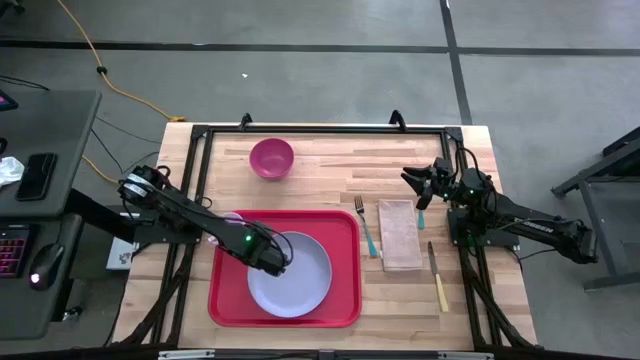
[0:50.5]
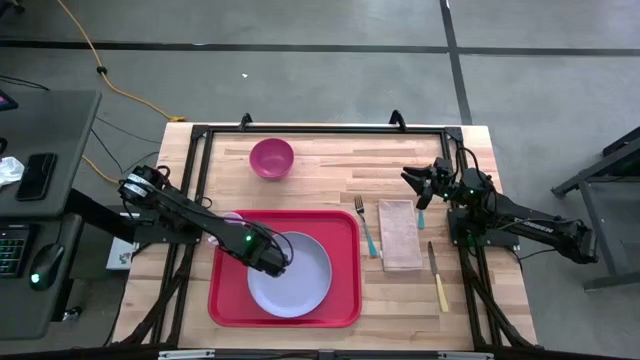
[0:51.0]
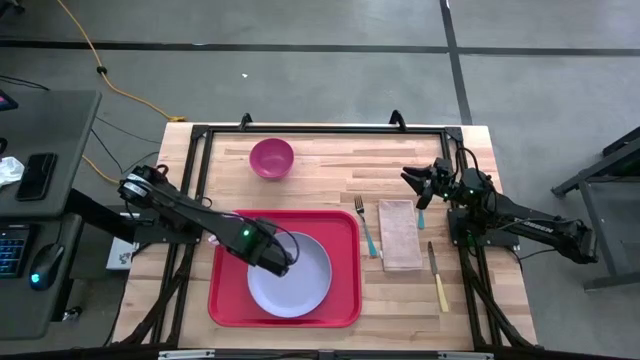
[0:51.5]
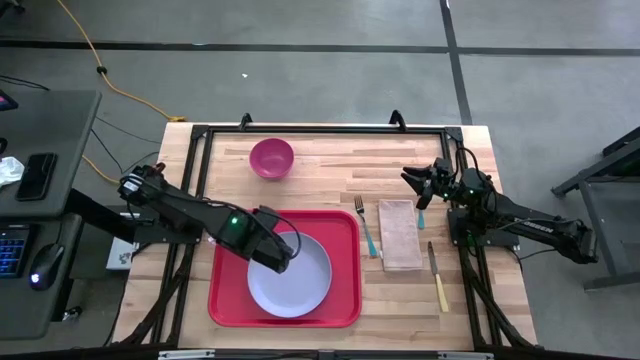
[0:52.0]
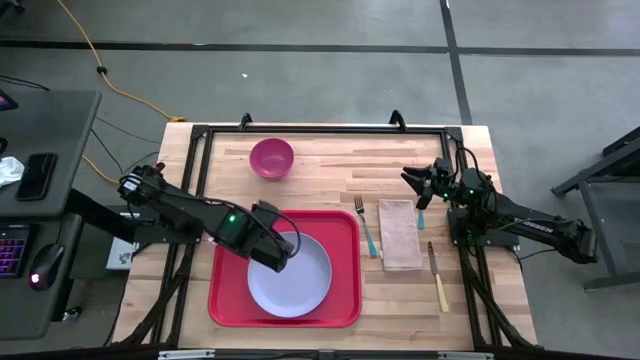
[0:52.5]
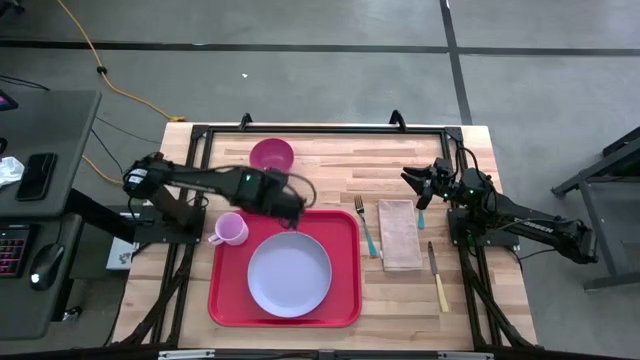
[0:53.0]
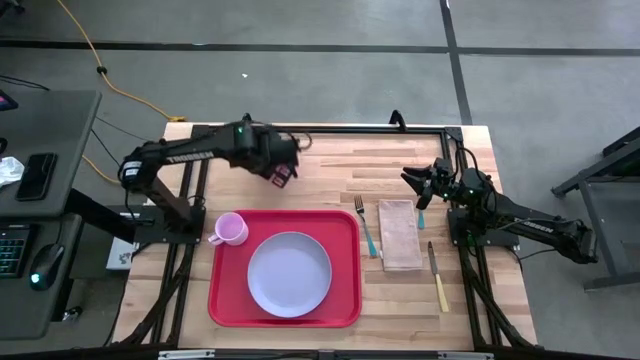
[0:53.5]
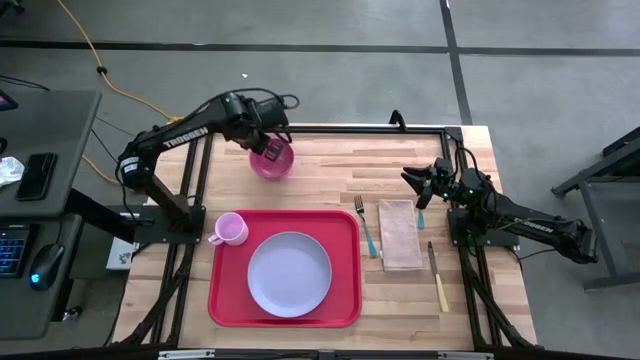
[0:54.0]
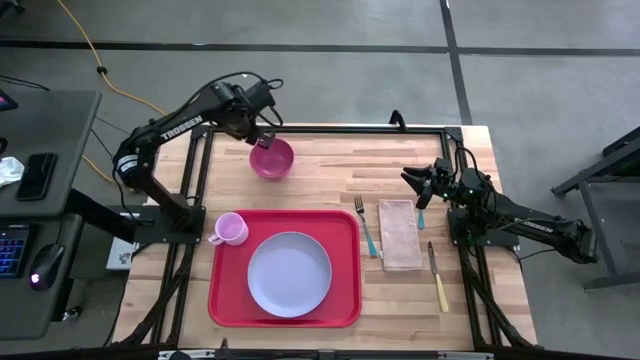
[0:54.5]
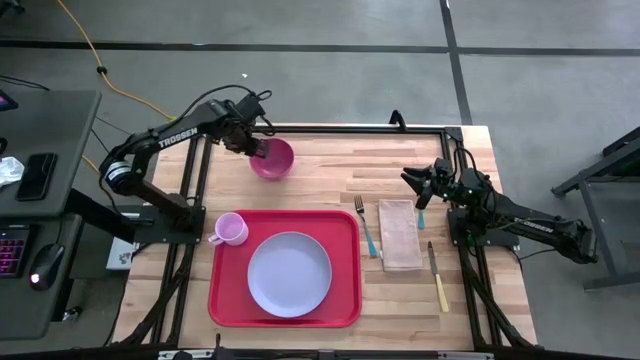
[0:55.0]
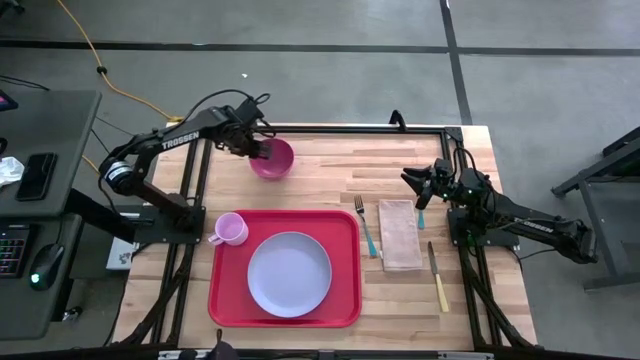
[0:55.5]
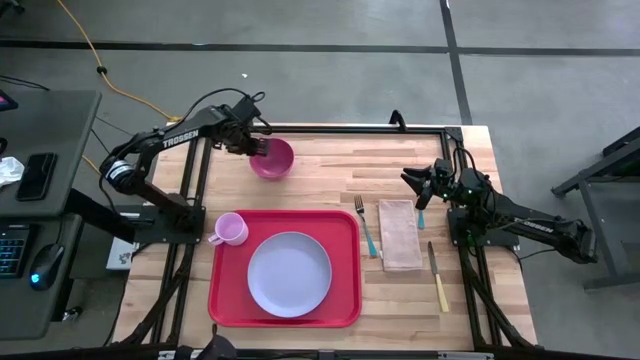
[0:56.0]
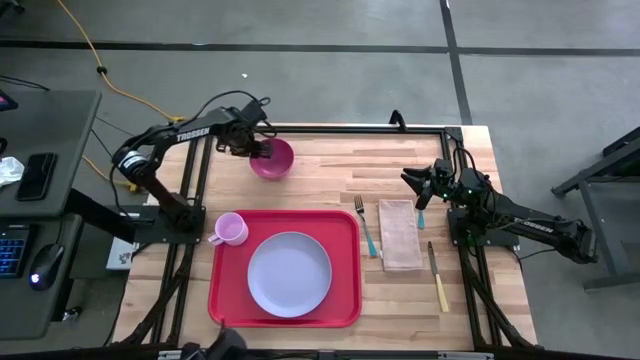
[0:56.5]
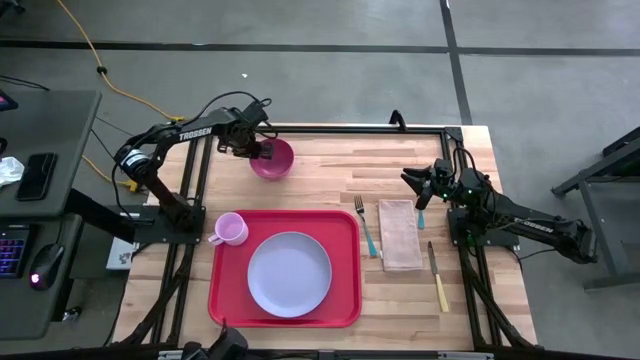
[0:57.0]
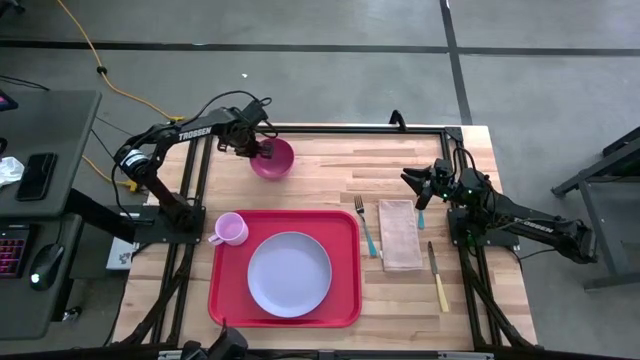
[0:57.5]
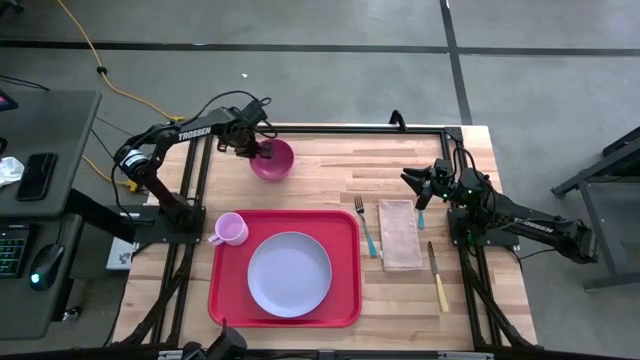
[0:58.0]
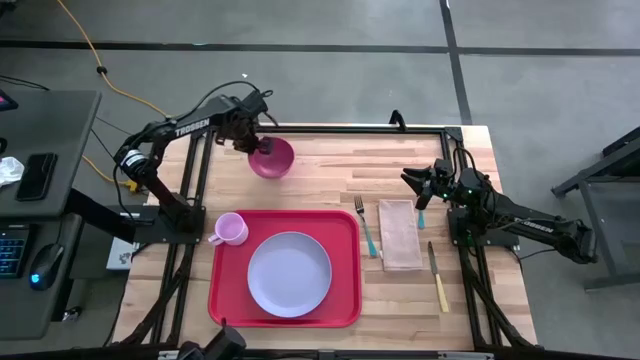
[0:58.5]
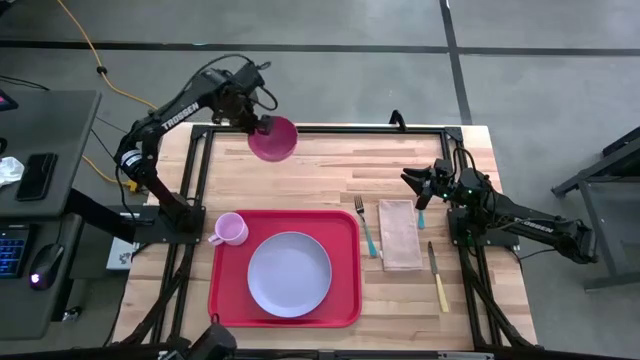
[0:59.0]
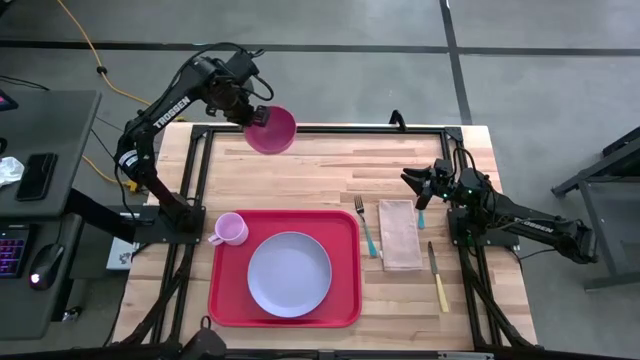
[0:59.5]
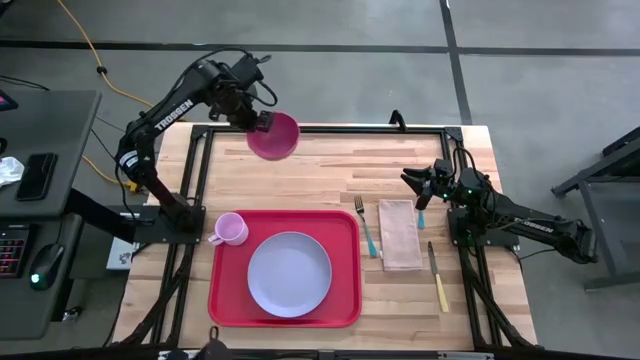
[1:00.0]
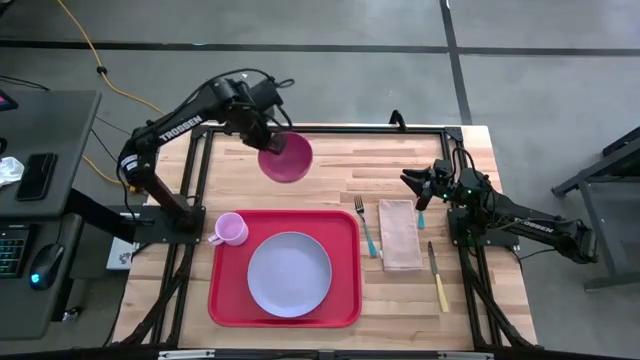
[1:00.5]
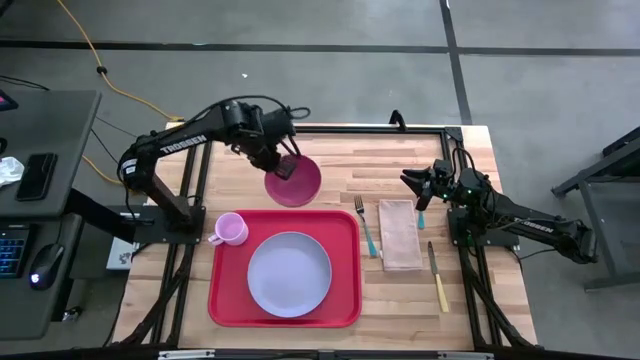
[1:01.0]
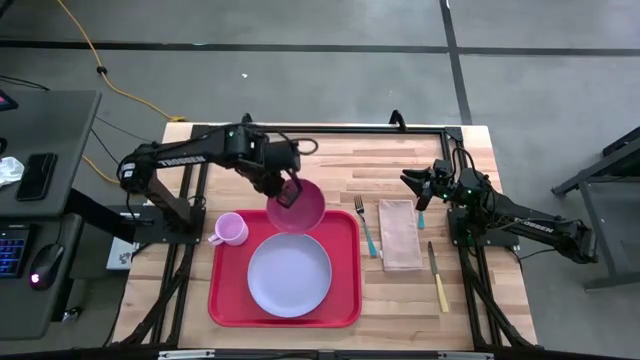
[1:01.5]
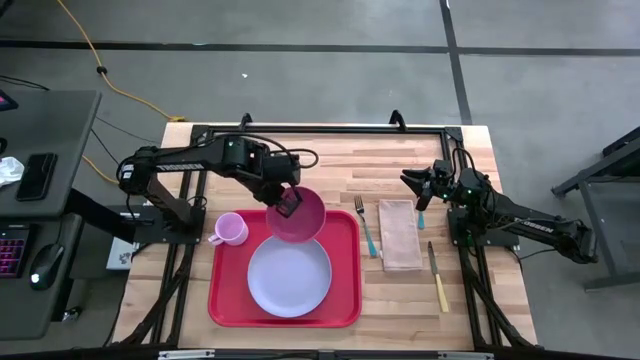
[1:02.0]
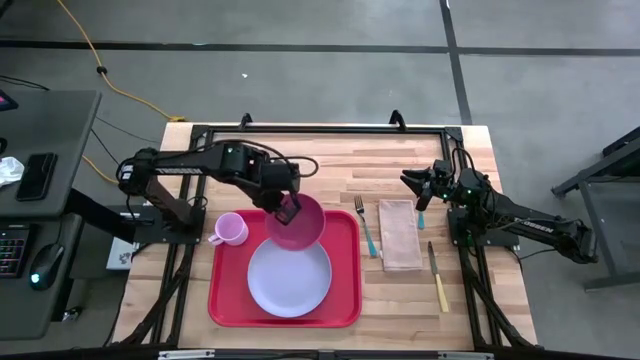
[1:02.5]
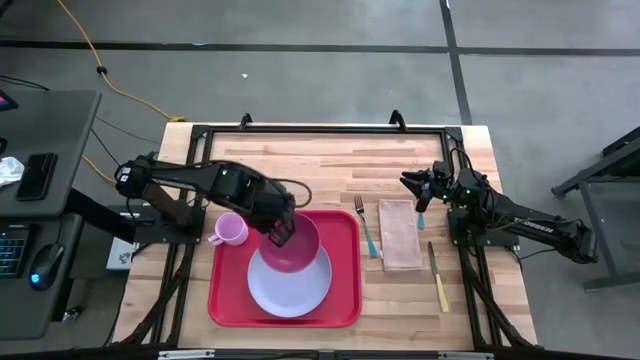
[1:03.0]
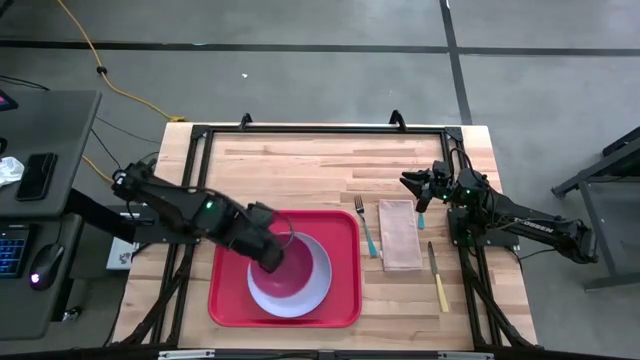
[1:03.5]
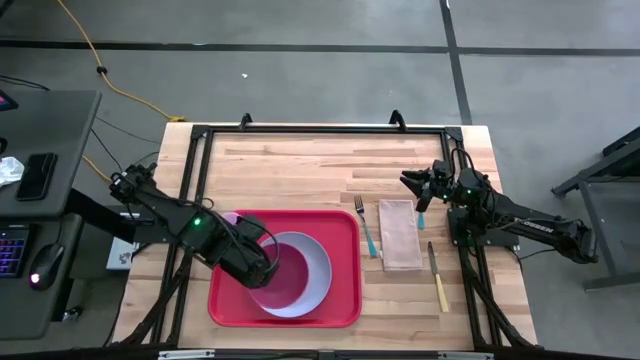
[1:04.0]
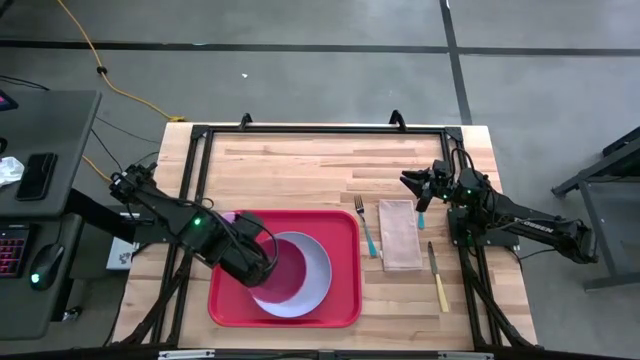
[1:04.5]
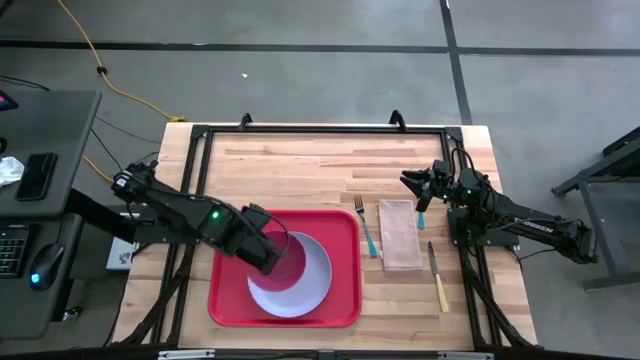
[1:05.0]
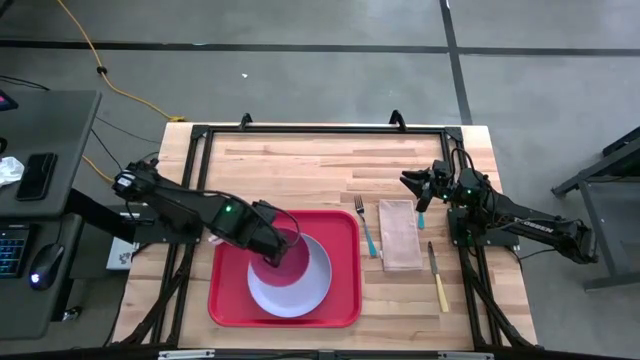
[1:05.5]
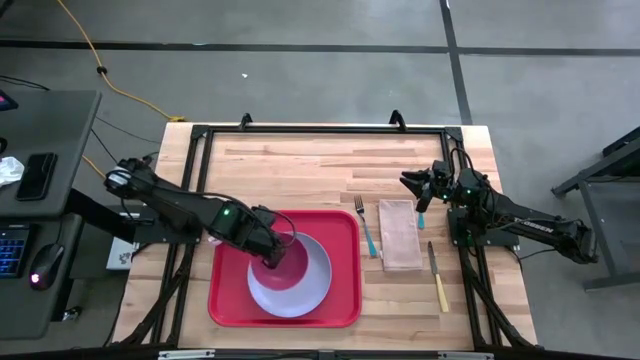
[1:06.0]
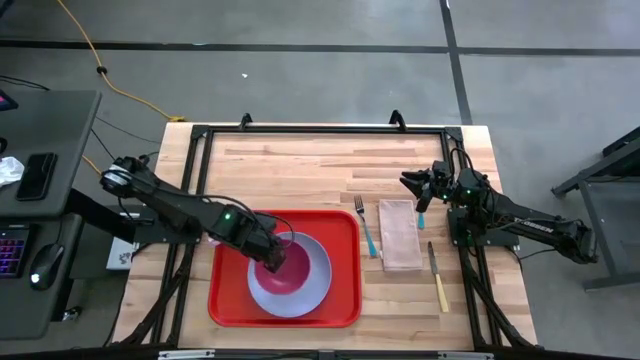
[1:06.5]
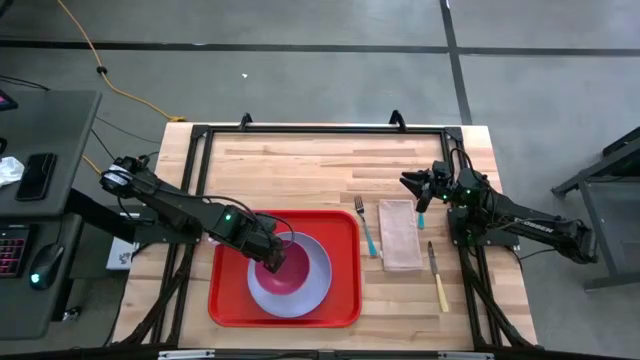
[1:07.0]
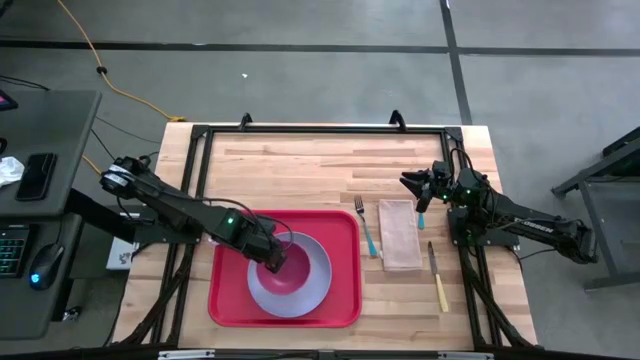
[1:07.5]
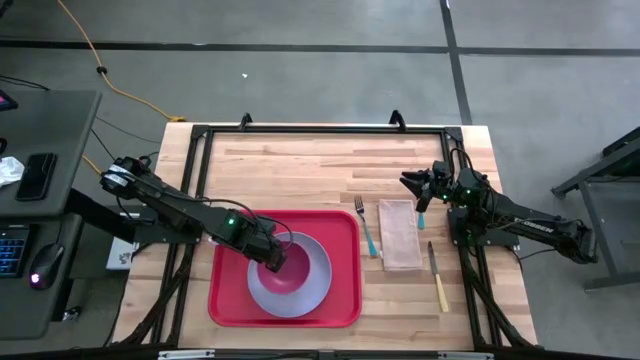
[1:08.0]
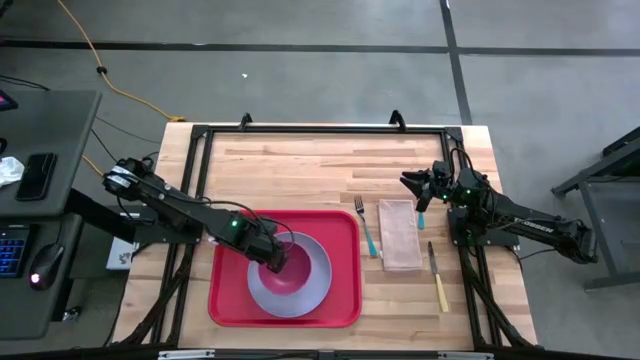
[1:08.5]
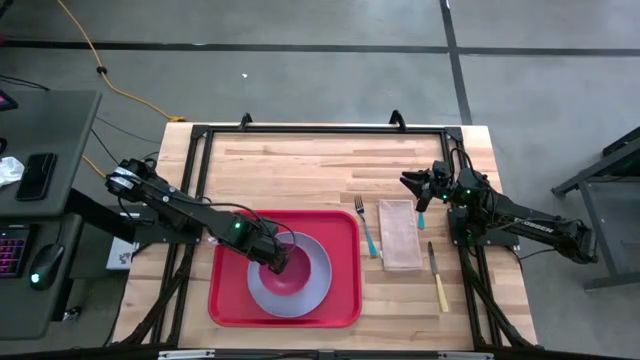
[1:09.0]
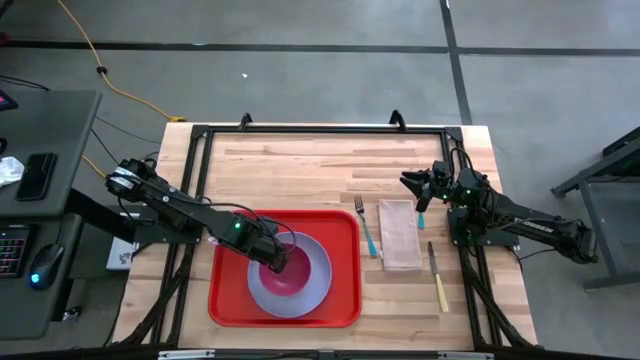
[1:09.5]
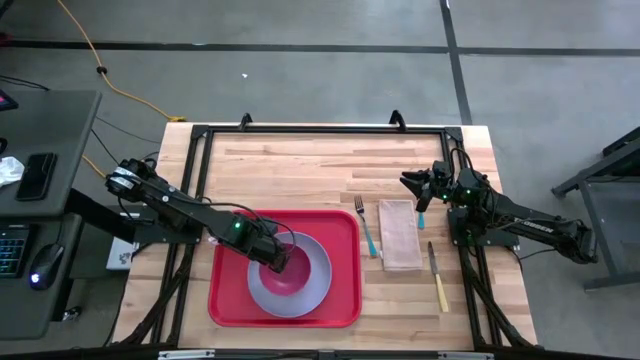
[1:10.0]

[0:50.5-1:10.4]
Task: Set up tray
Put the pink bowl on the white plate on the red tray

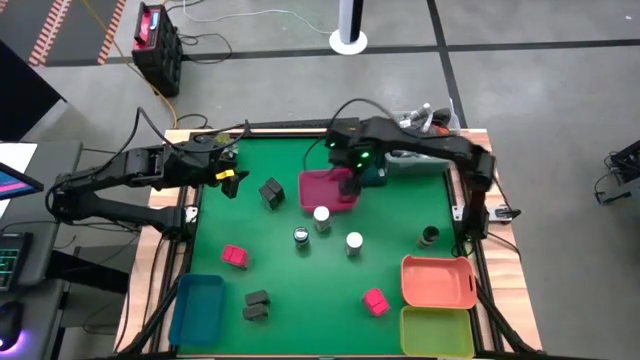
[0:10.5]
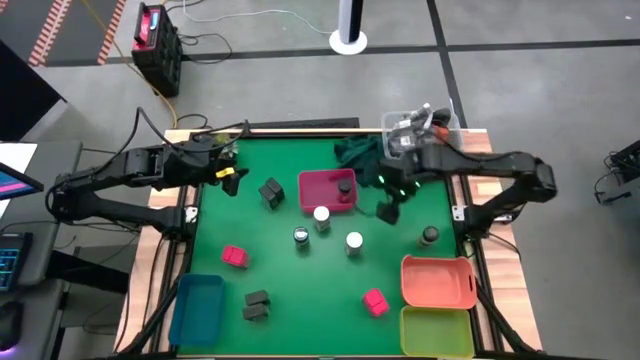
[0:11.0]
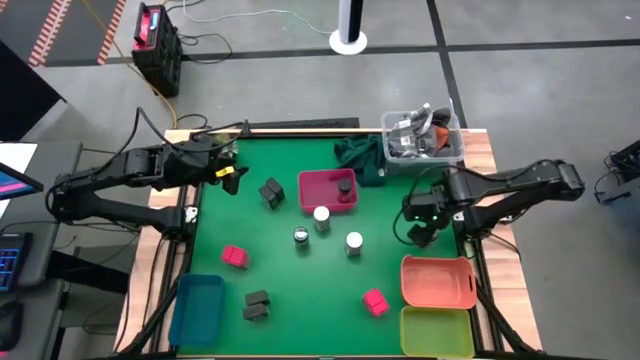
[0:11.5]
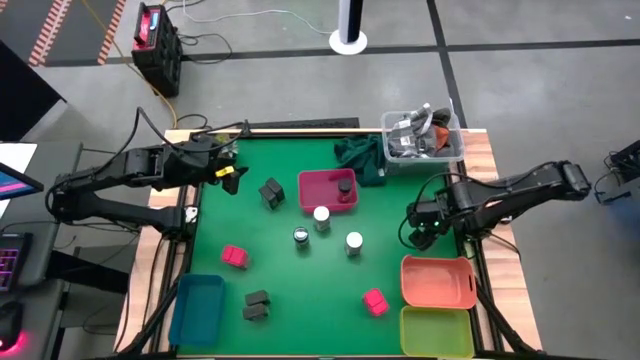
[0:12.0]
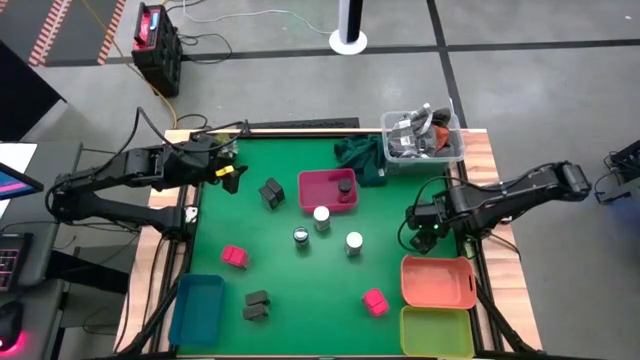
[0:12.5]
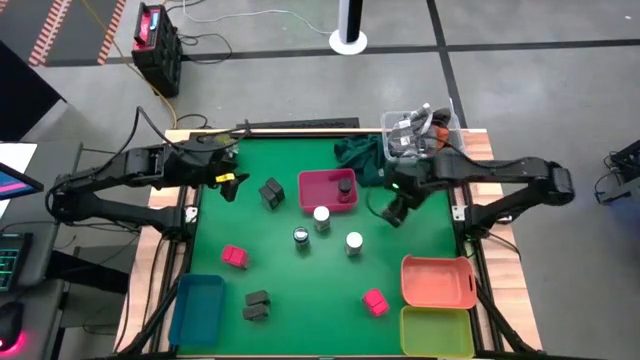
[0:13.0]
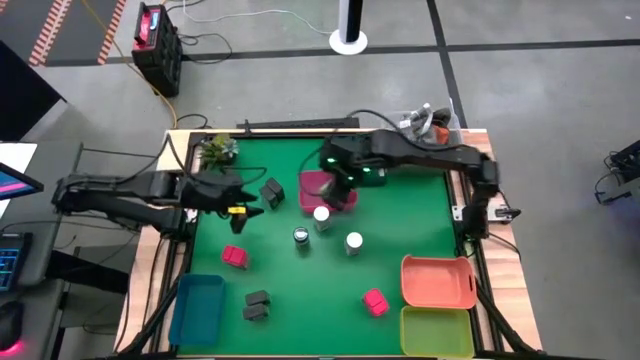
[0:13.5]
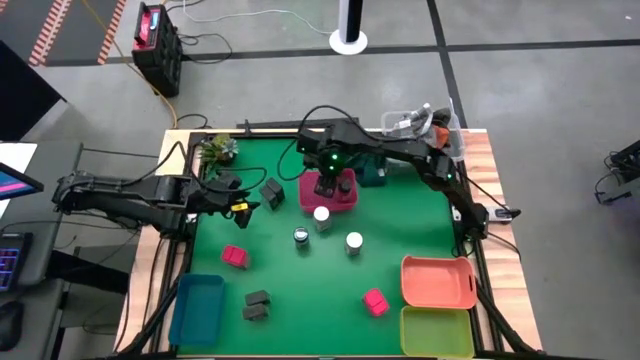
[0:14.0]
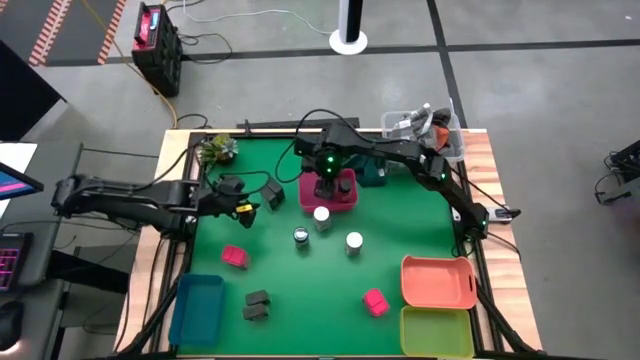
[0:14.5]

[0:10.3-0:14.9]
Task: Sort spices by type
Put the right black seasoning bottle into the red bin
